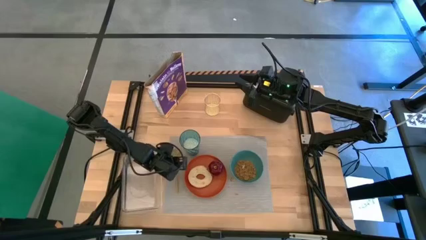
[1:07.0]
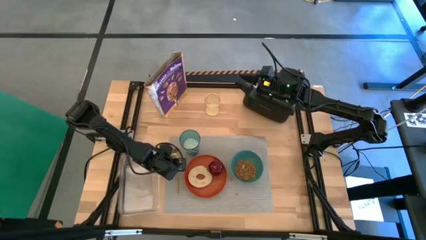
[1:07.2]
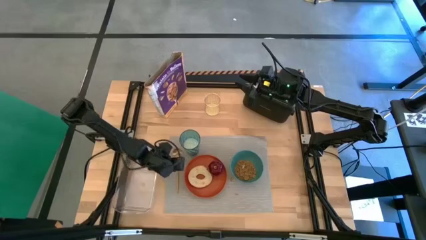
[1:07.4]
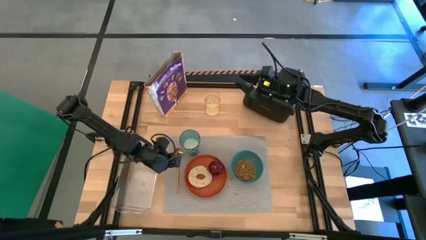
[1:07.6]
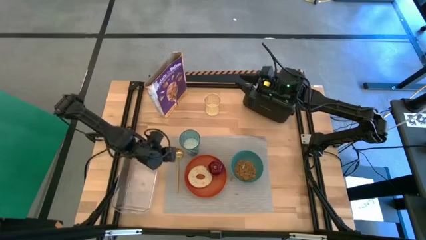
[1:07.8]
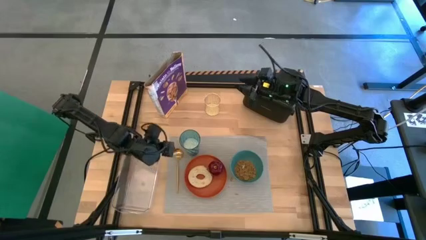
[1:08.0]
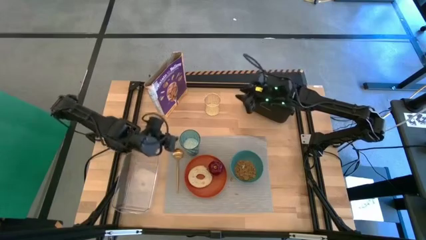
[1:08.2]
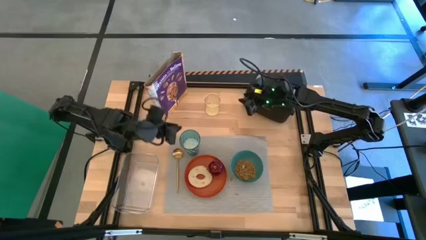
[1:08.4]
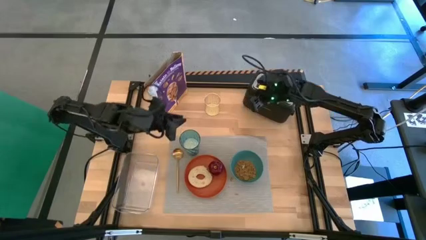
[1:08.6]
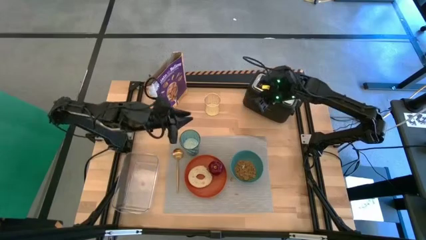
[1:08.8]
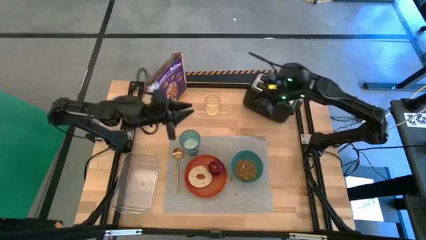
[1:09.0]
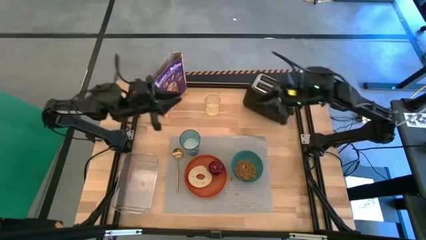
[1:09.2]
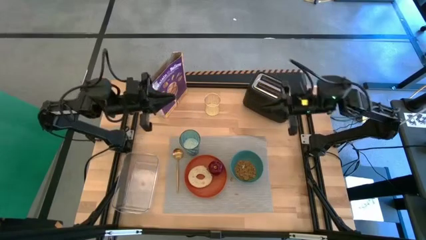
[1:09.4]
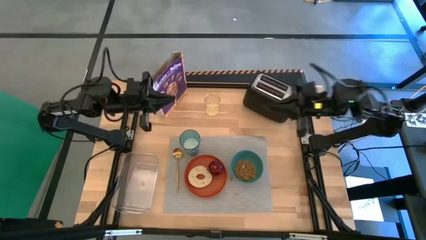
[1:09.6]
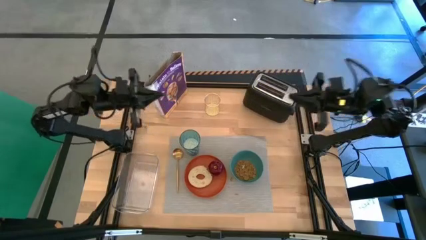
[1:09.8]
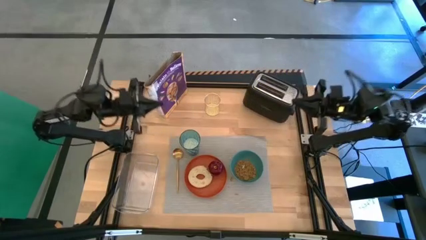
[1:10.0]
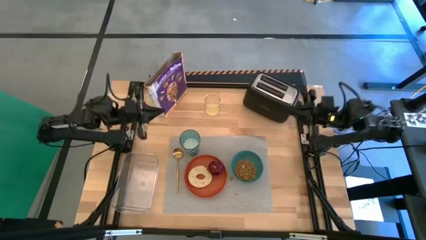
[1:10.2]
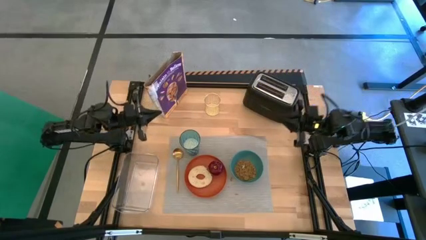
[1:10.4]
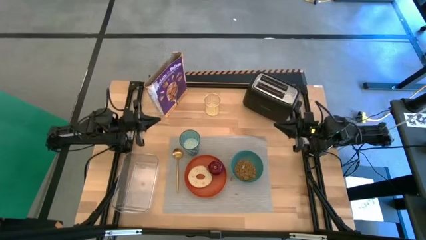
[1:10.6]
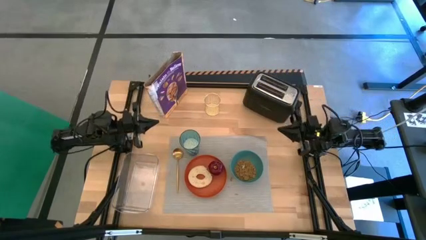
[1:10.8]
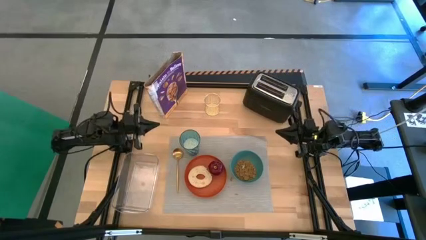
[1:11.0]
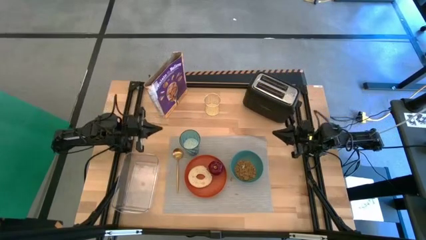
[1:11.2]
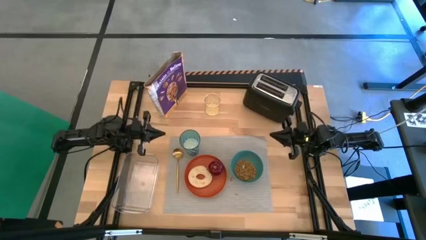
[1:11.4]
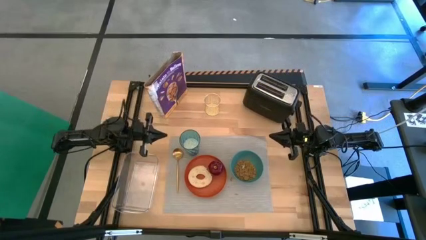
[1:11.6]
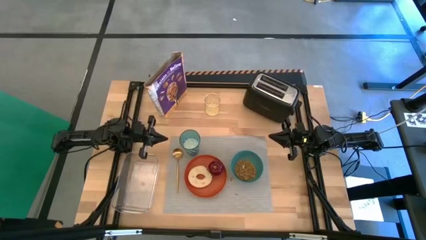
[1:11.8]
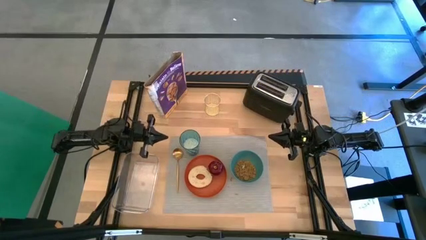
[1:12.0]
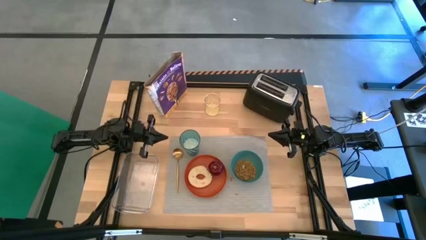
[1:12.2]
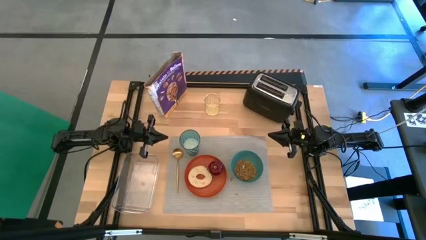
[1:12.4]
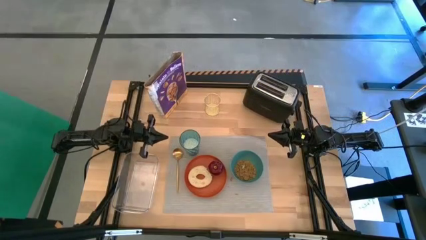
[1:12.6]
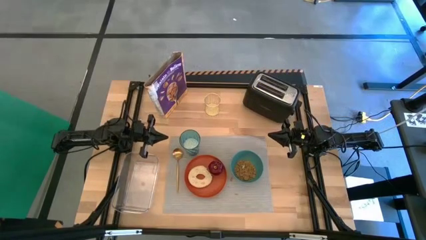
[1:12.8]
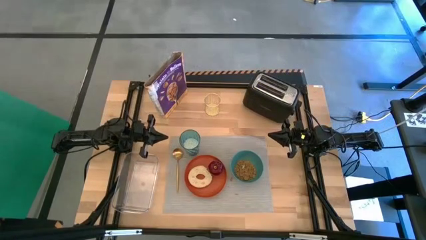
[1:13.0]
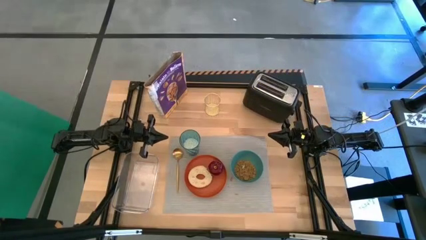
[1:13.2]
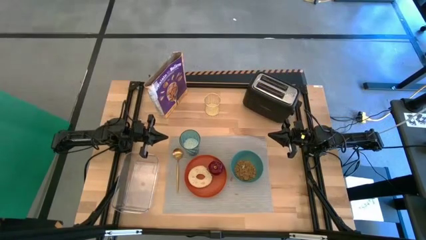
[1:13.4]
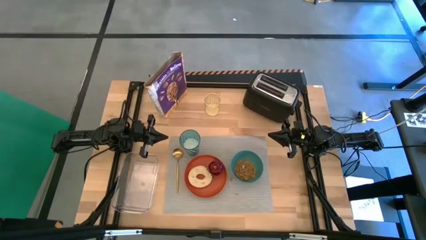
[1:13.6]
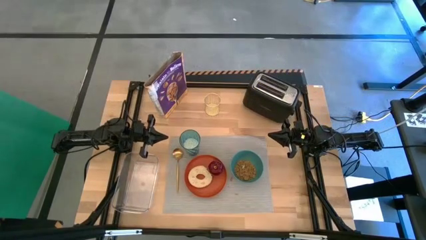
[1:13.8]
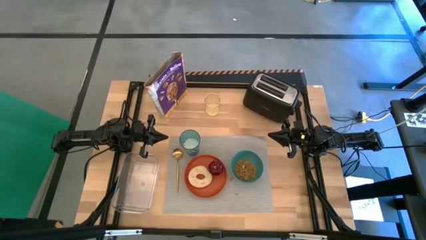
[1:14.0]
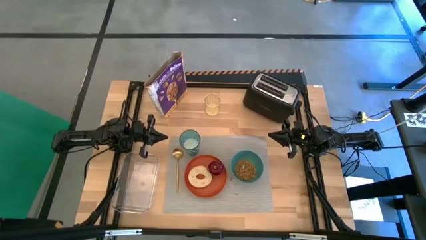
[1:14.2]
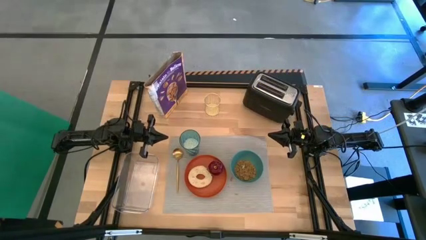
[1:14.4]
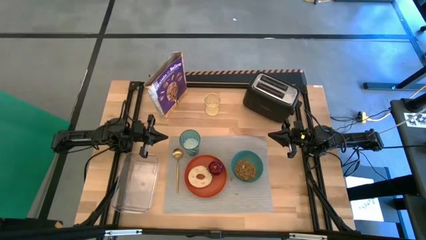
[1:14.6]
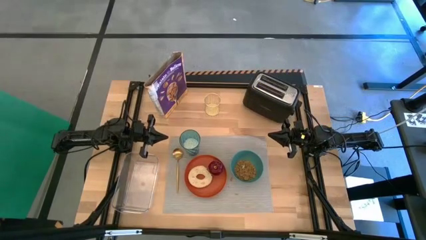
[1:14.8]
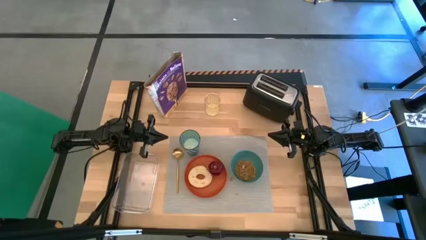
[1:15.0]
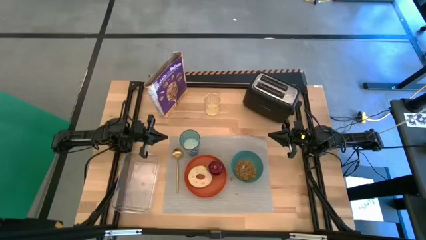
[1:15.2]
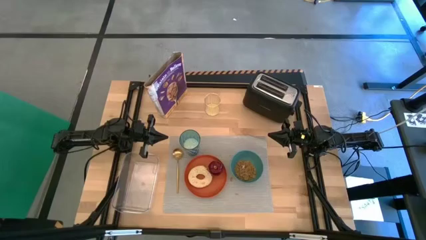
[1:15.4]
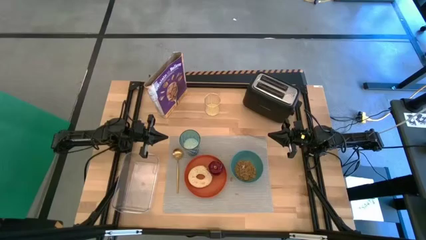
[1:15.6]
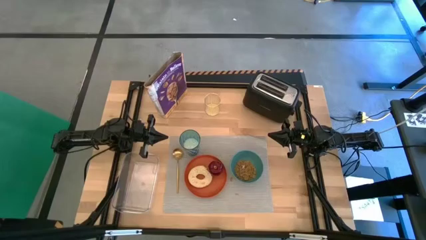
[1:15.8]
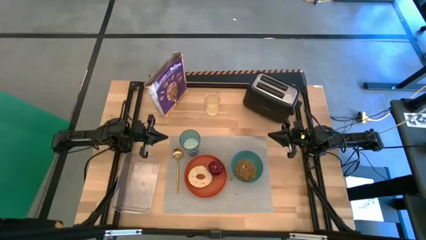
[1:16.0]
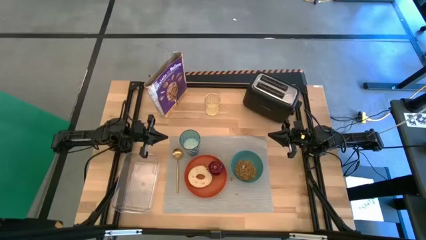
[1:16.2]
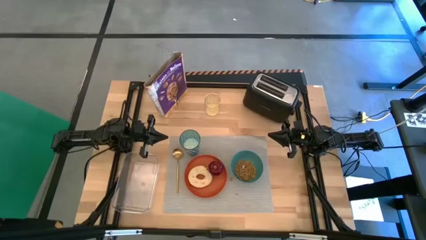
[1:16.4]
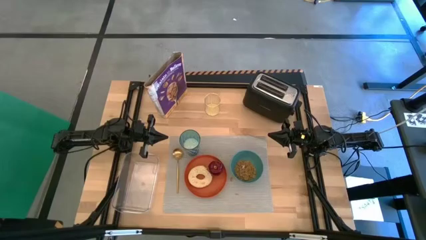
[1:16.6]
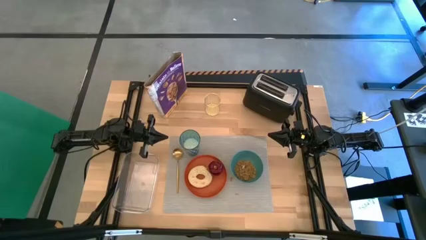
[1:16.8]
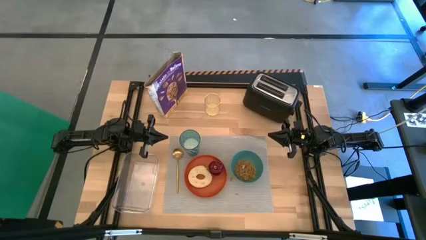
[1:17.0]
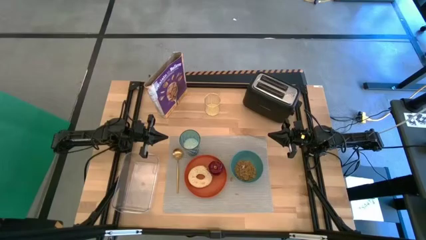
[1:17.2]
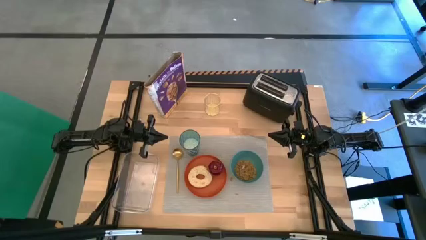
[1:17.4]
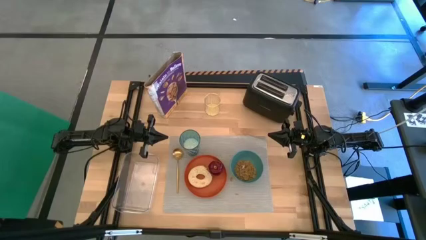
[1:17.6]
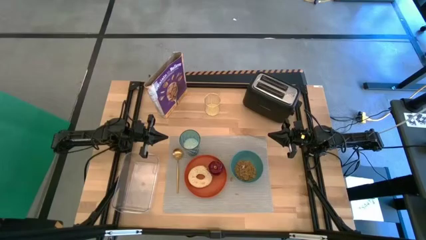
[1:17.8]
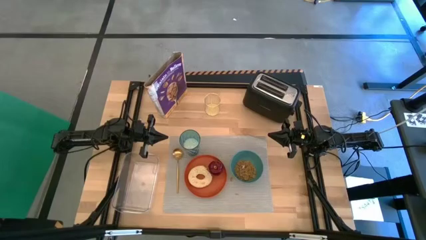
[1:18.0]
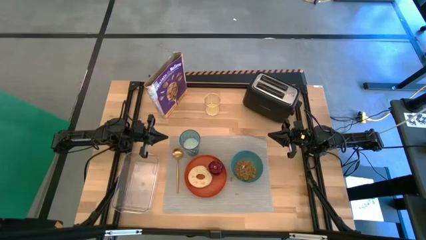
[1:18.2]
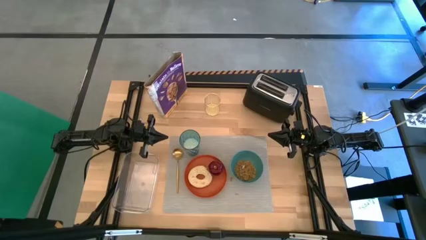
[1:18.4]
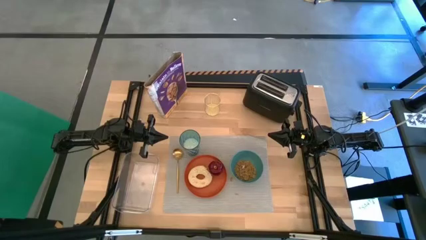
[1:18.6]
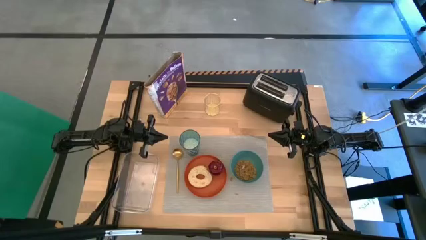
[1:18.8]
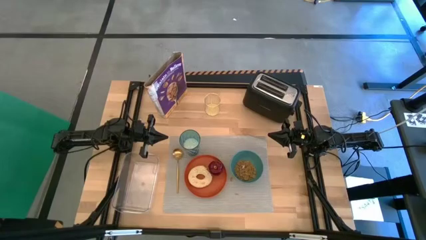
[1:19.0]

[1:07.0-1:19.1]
Task: Arrange a breakfast setting
Return to Home Position

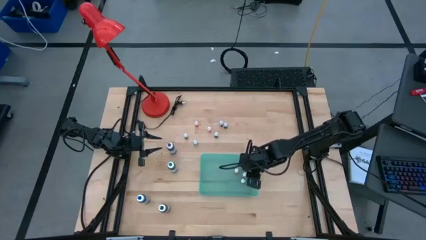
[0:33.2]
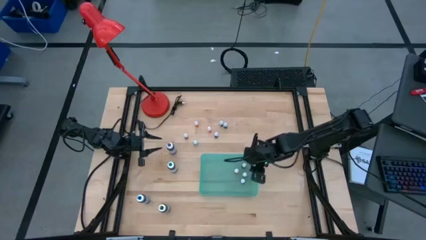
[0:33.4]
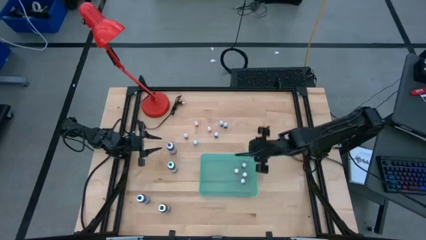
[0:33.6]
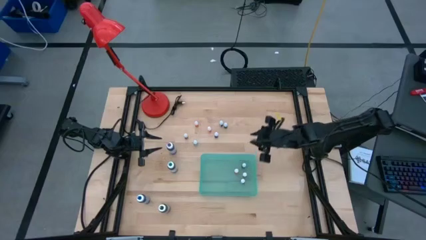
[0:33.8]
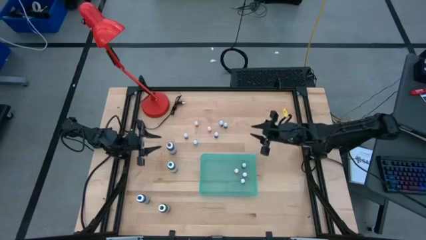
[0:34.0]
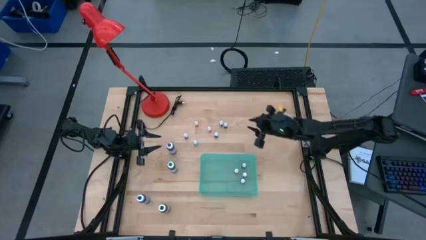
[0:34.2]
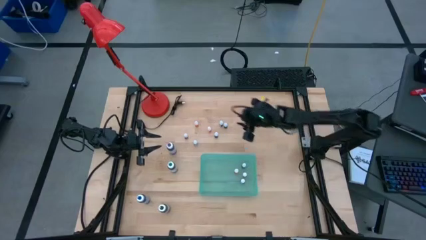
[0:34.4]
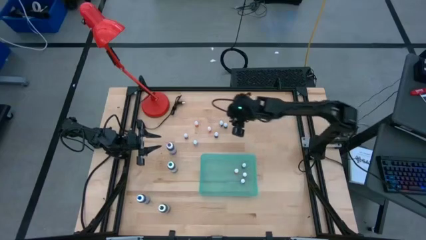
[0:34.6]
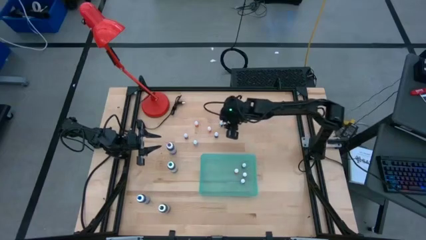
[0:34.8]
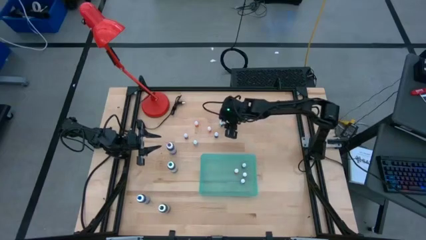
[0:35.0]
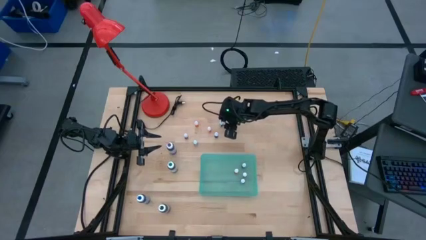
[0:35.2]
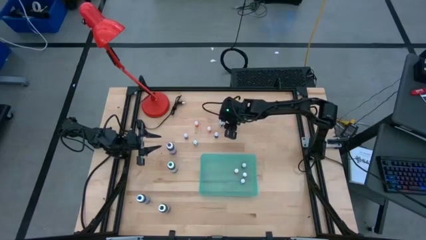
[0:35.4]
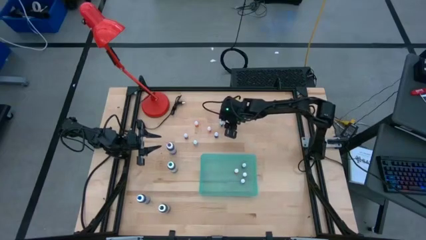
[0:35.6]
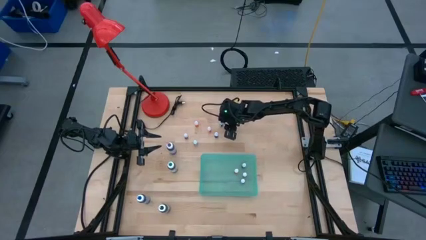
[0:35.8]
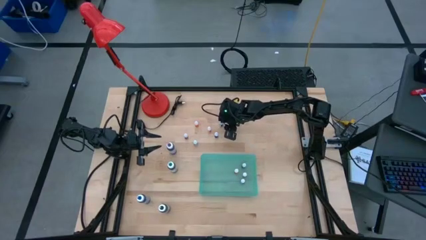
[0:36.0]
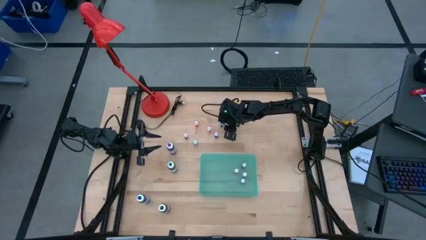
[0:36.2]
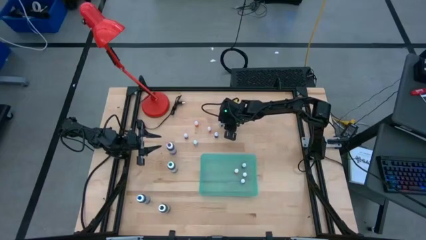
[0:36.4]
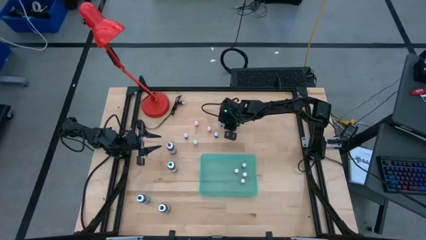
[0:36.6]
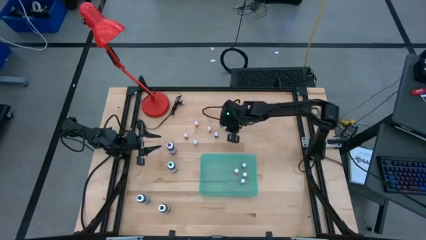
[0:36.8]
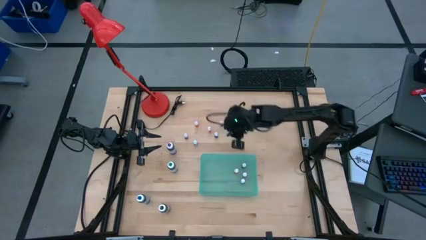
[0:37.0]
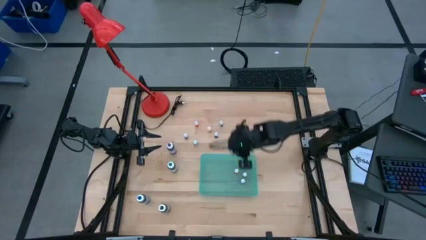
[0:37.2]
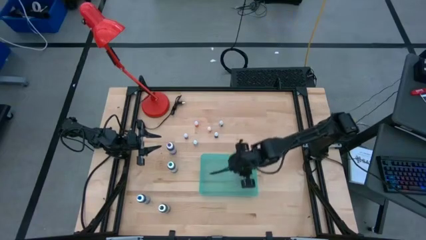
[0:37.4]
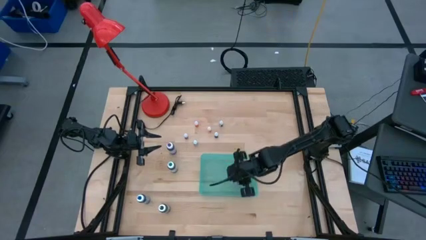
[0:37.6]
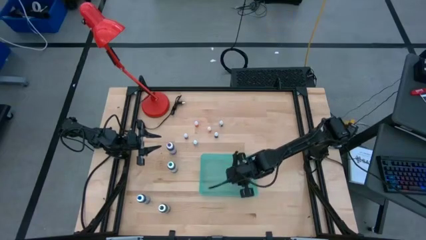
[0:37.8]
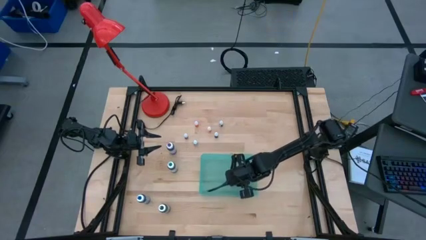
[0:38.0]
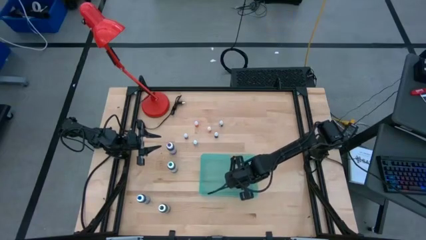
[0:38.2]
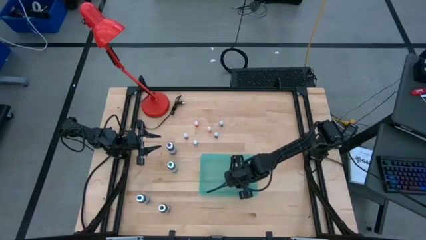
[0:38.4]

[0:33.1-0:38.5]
Task: Pick & Place food coloring
Put the small blue food coloring bottle into the green bin
